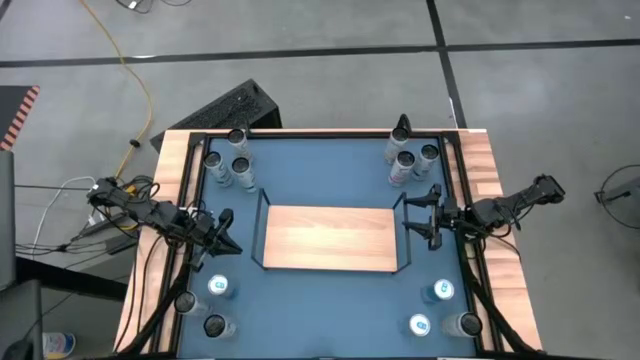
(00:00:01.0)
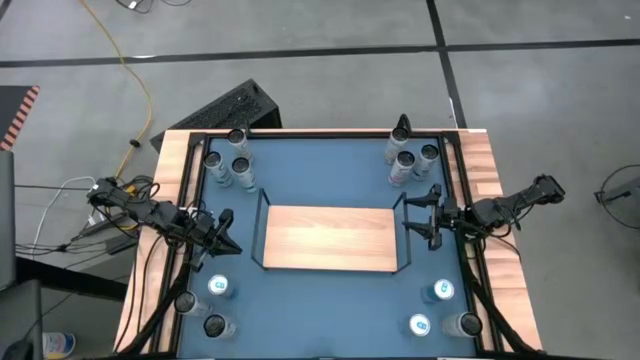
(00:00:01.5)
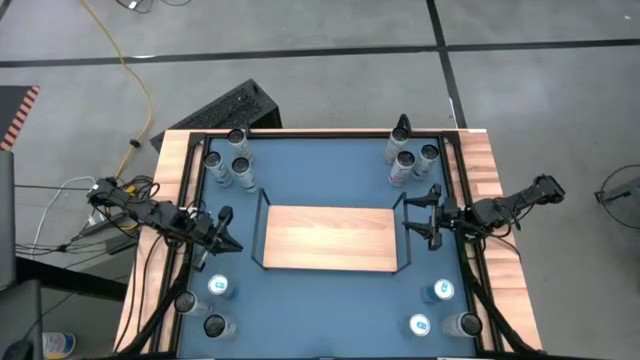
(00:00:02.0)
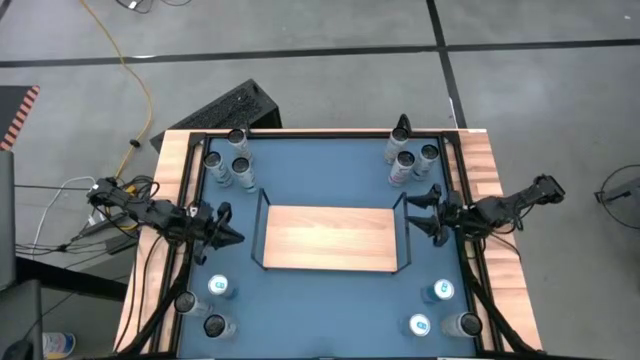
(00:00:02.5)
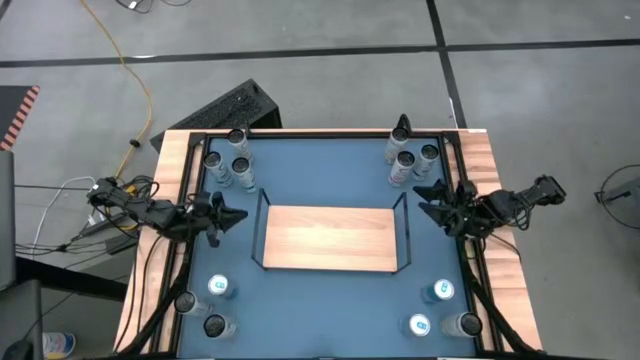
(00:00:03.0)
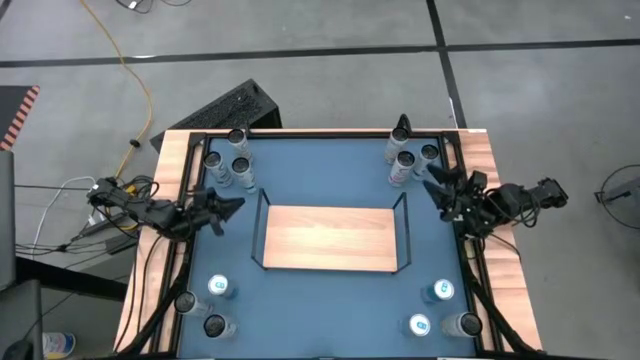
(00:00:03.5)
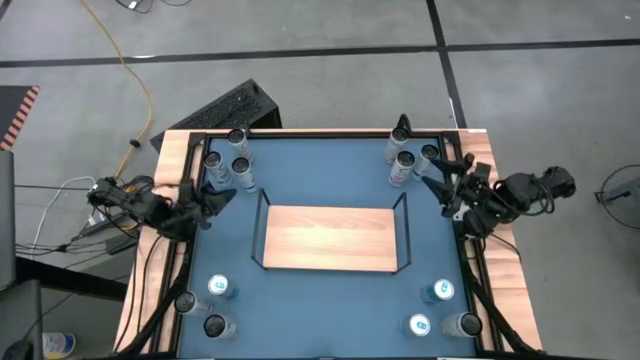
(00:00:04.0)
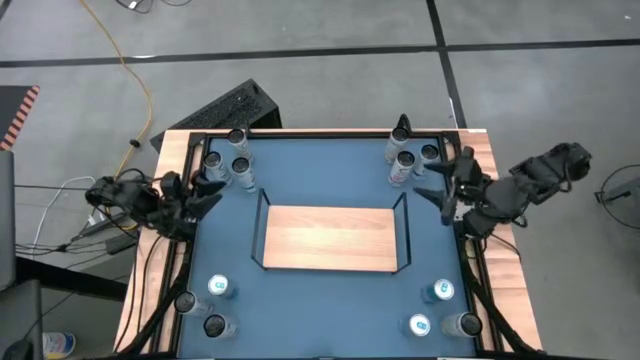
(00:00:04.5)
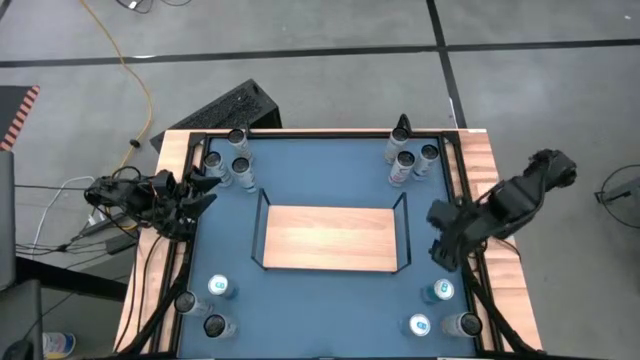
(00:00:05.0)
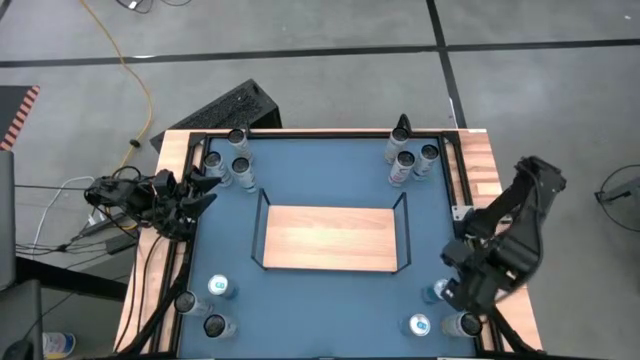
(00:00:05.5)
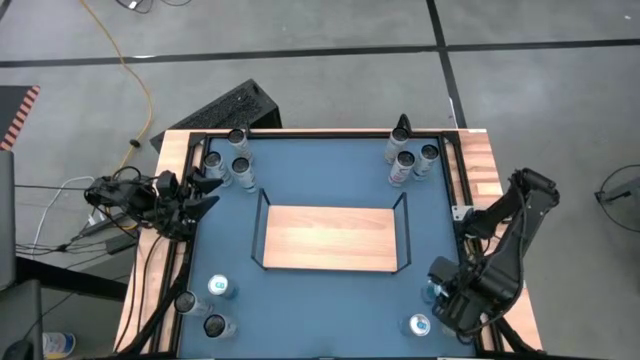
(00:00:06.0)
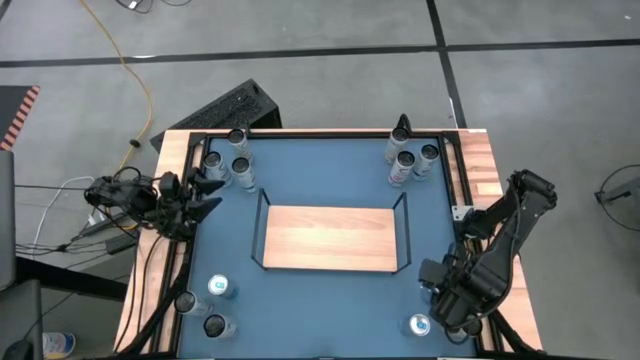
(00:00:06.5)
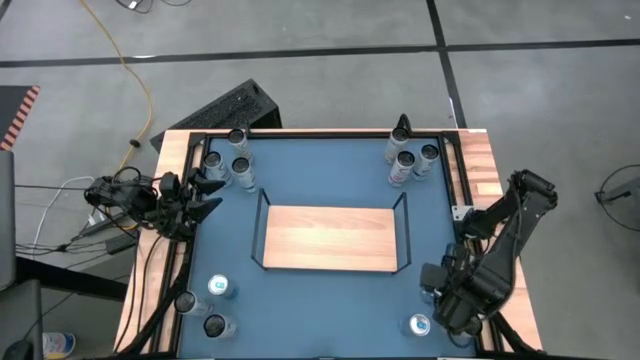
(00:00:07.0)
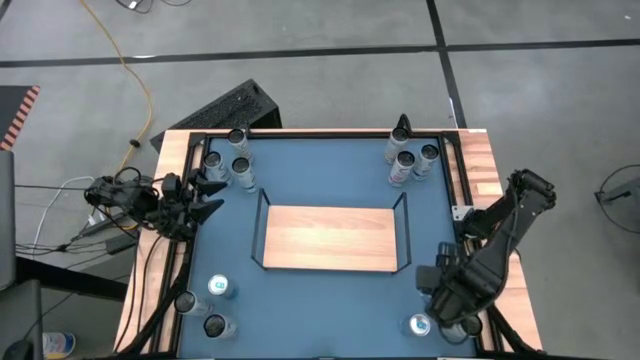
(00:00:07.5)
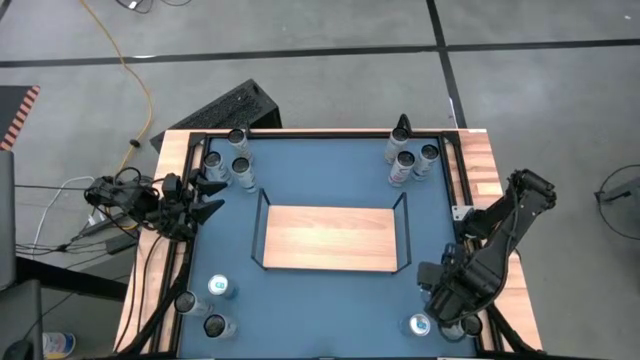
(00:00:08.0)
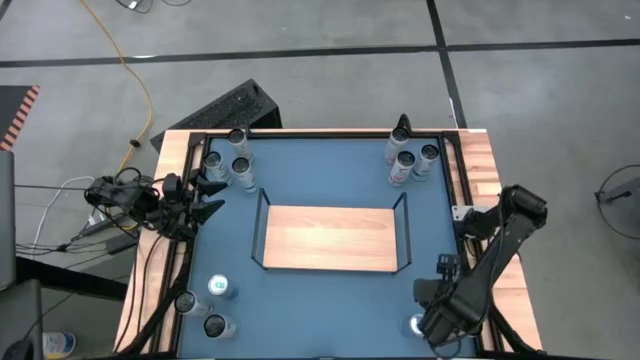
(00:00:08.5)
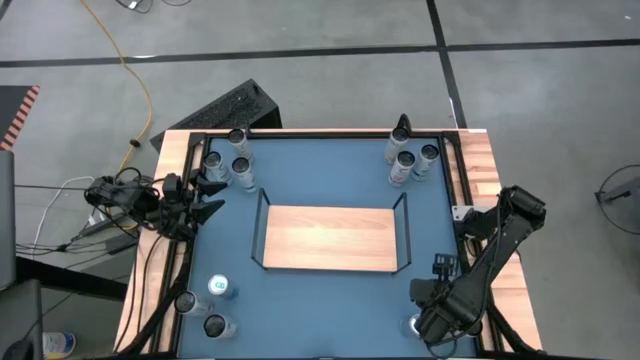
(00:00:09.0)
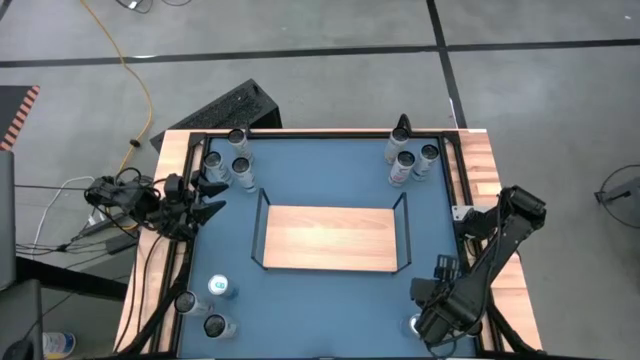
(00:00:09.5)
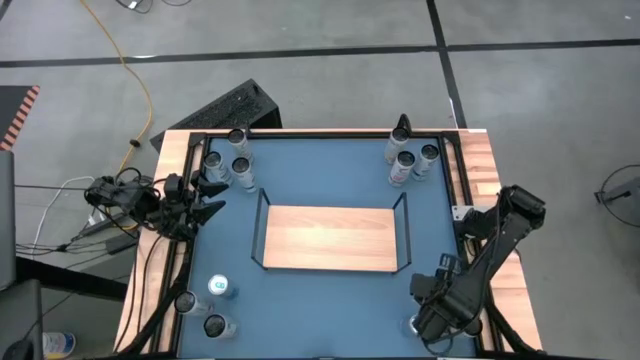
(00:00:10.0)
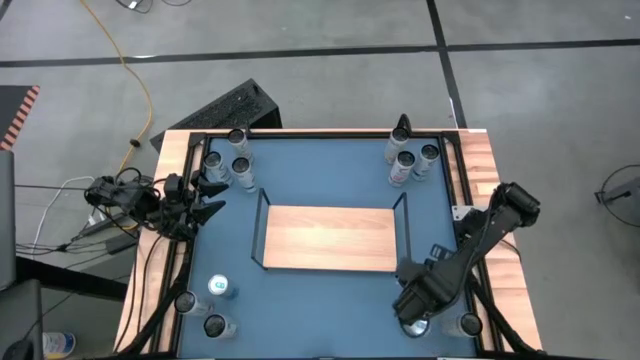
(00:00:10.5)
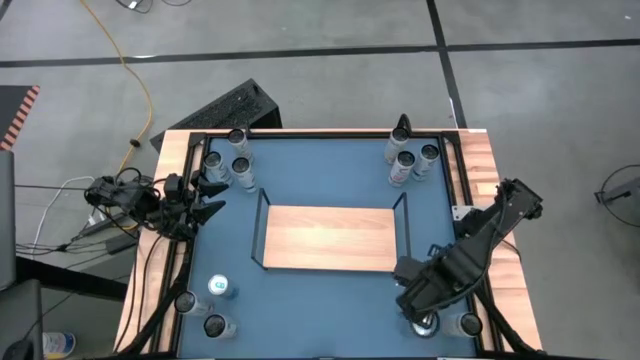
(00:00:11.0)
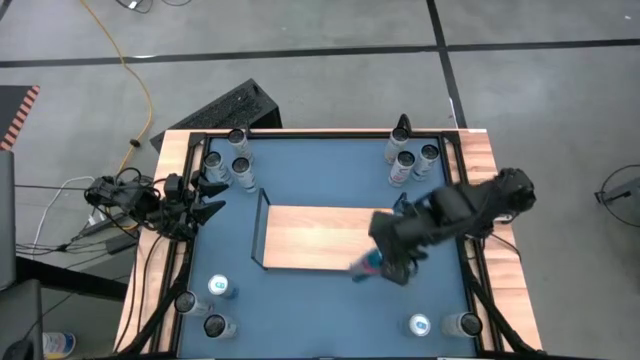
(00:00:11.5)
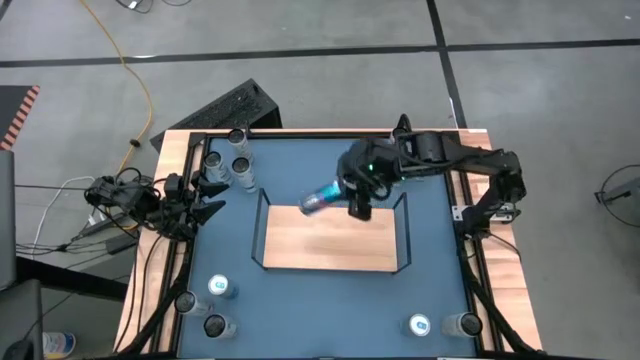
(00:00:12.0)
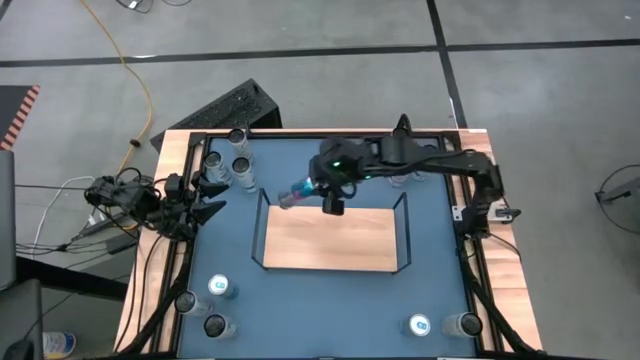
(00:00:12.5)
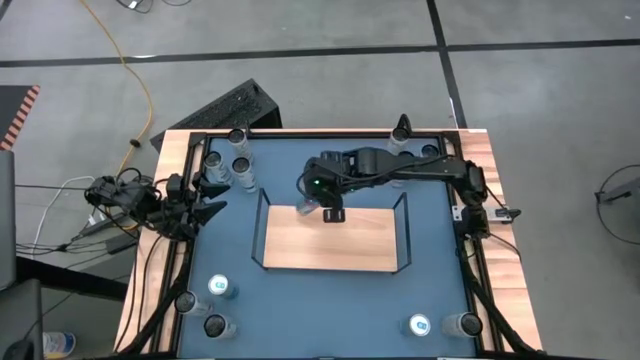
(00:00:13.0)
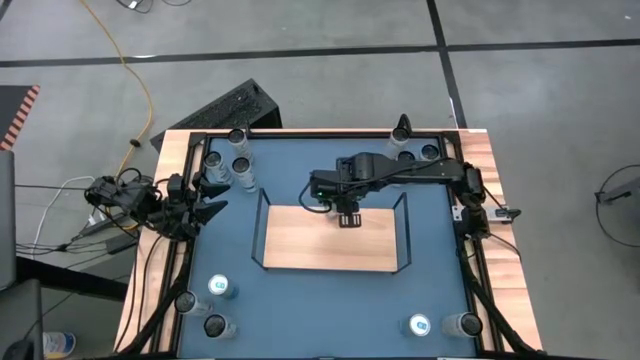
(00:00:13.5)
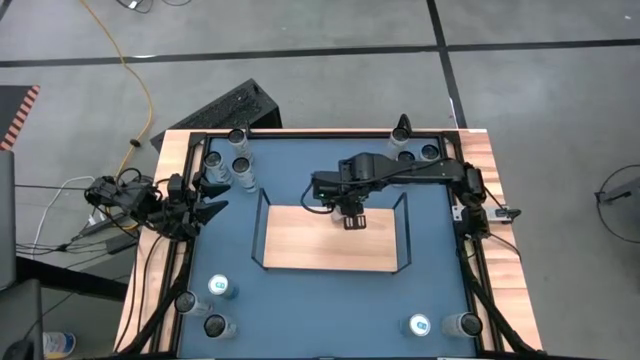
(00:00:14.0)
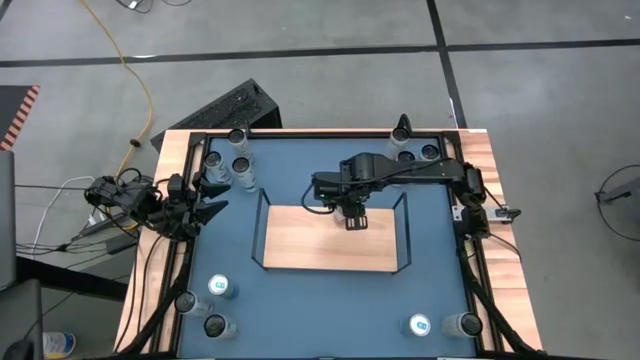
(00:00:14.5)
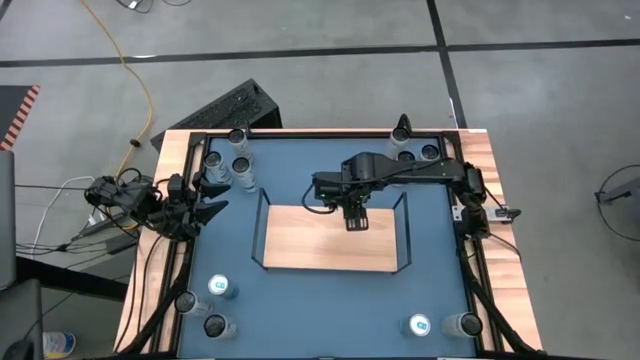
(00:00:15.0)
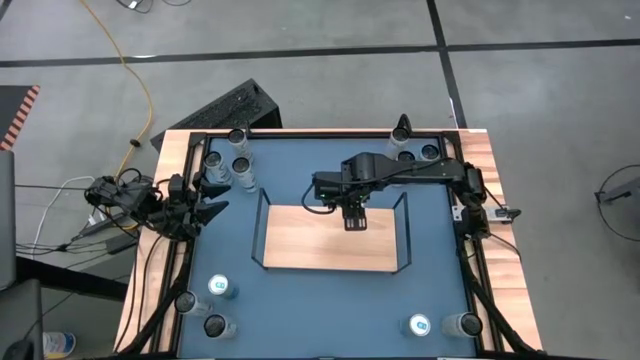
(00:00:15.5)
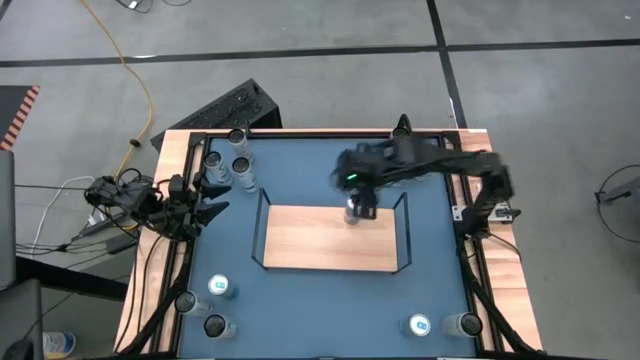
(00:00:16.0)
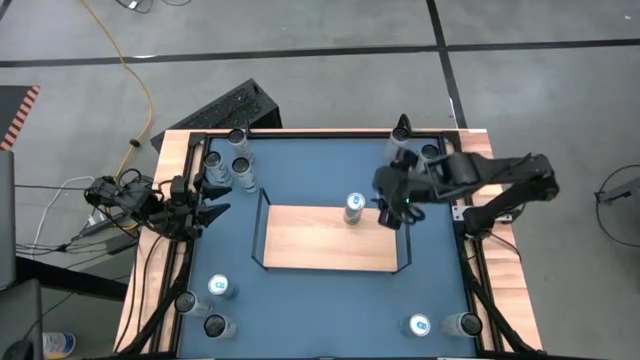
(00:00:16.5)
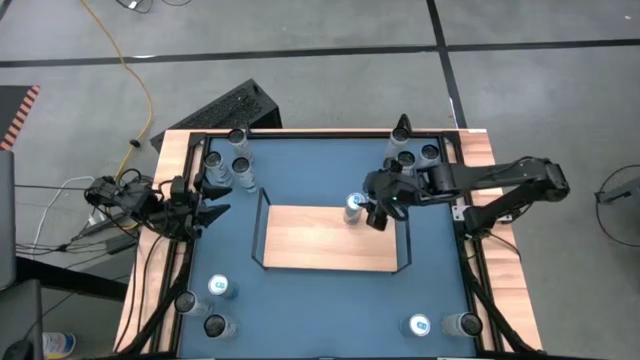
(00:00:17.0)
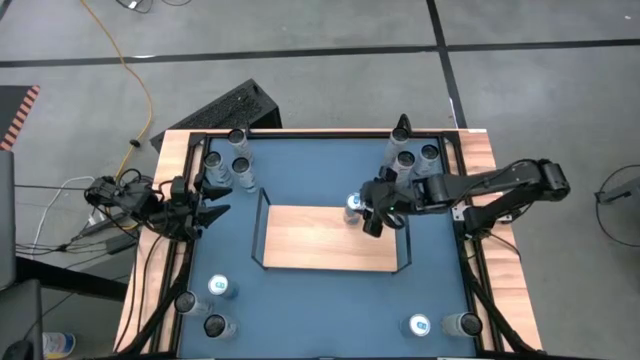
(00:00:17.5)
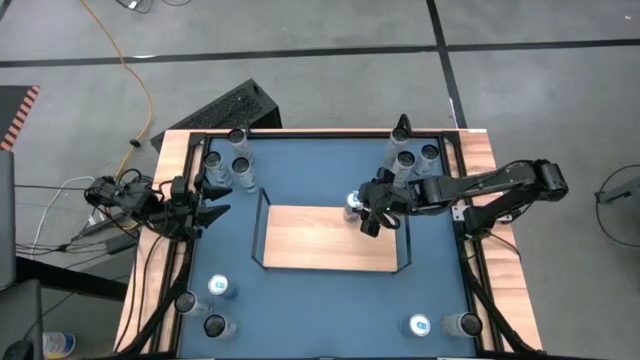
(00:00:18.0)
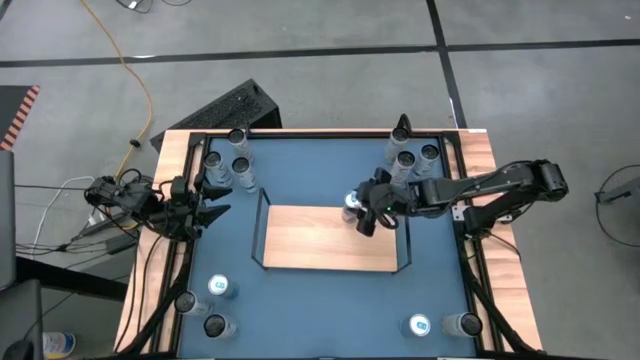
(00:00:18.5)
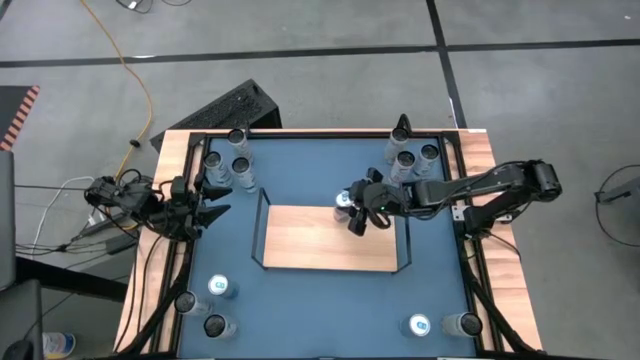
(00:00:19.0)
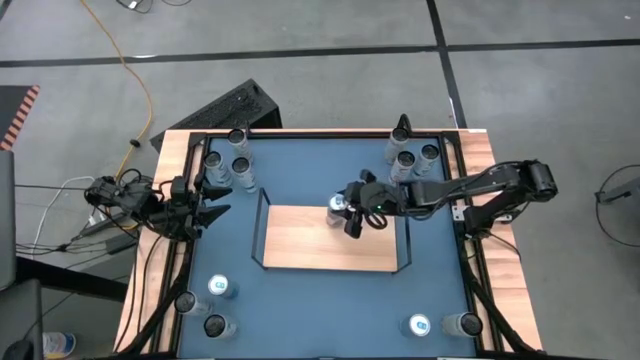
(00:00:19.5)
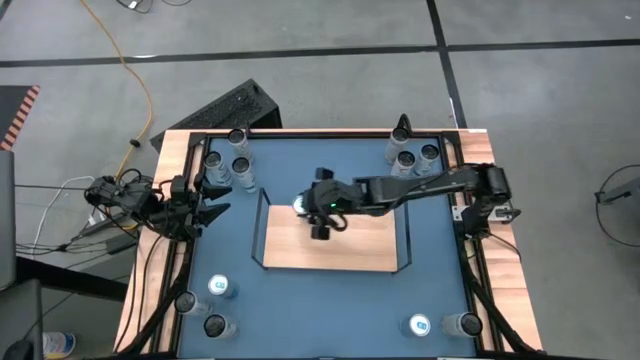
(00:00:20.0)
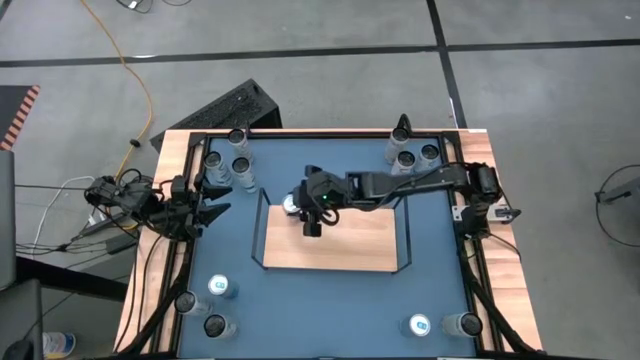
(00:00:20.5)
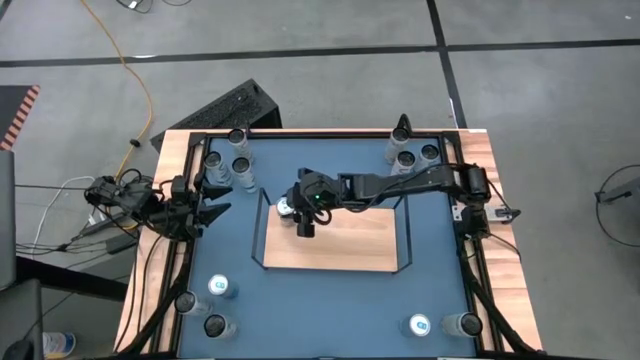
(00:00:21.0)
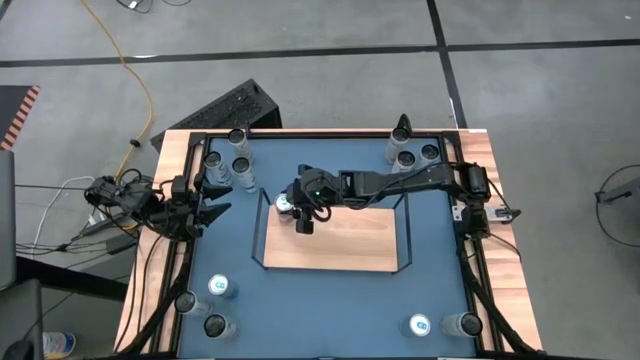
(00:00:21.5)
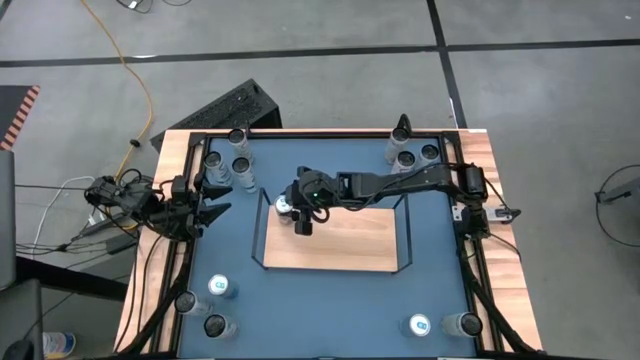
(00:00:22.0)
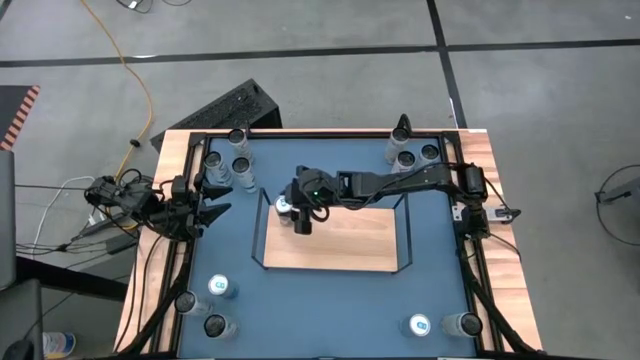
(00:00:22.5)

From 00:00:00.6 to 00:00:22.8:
Task: Place canned beverage on shelf
Put the top right blue soda can on the shelf
